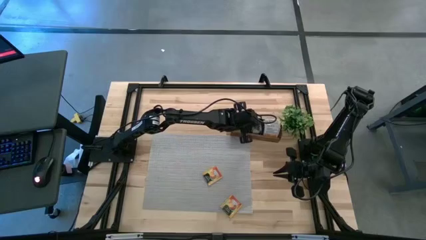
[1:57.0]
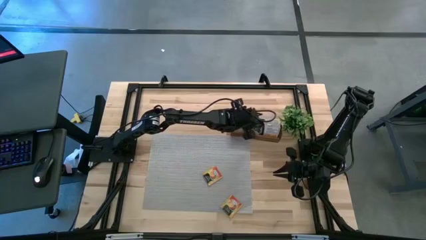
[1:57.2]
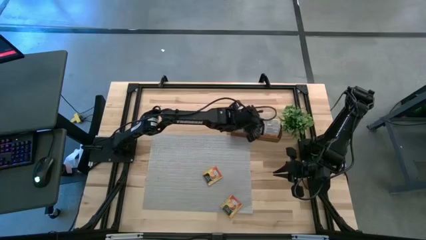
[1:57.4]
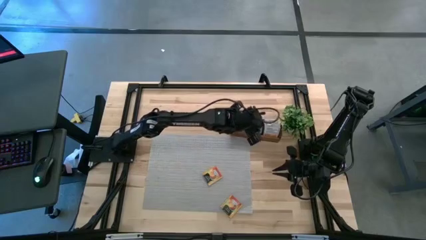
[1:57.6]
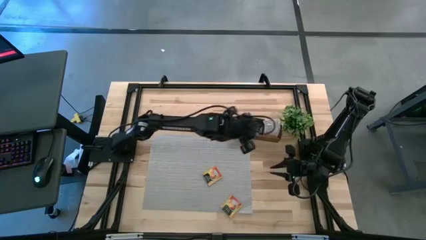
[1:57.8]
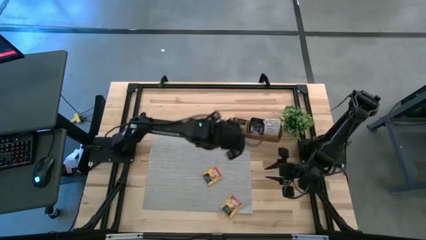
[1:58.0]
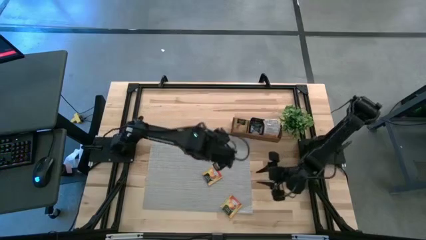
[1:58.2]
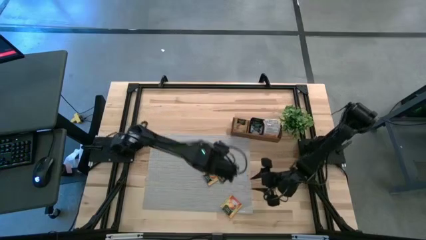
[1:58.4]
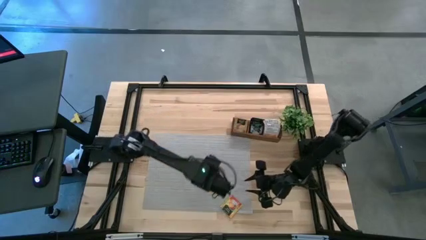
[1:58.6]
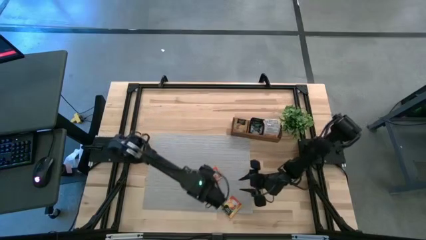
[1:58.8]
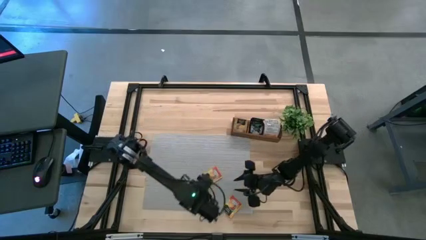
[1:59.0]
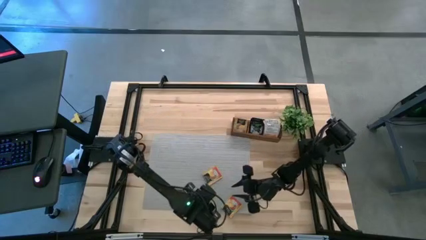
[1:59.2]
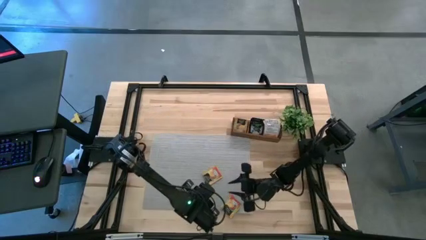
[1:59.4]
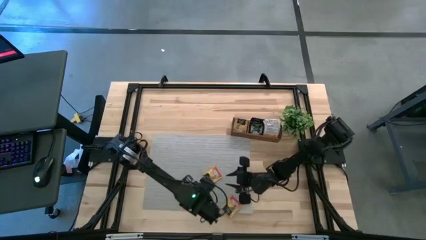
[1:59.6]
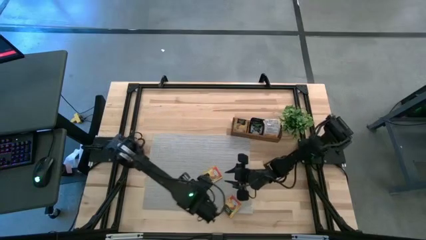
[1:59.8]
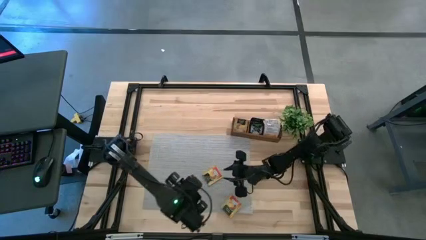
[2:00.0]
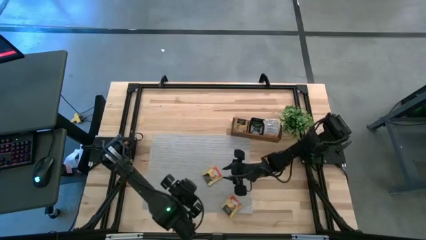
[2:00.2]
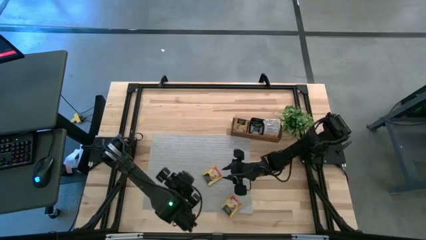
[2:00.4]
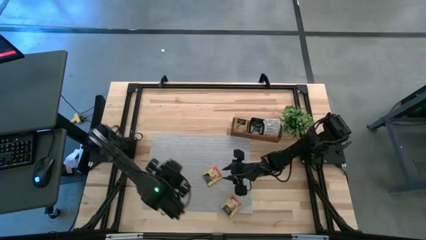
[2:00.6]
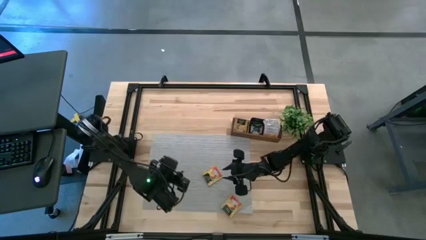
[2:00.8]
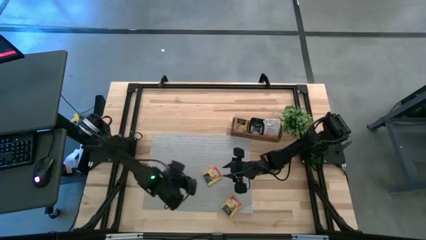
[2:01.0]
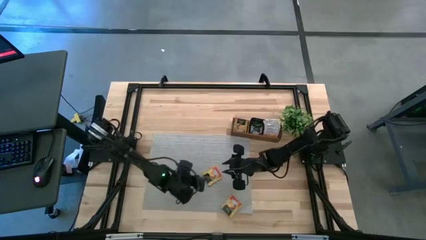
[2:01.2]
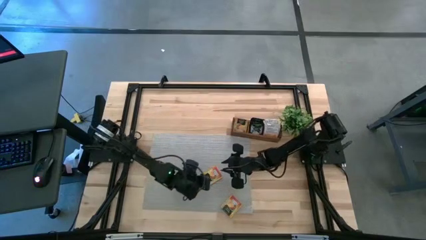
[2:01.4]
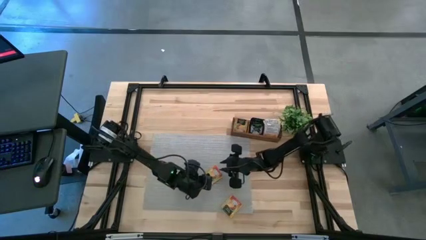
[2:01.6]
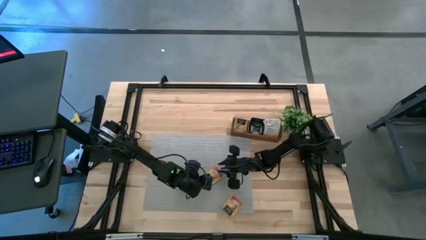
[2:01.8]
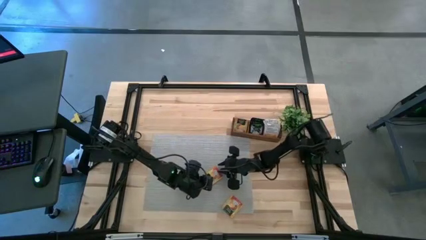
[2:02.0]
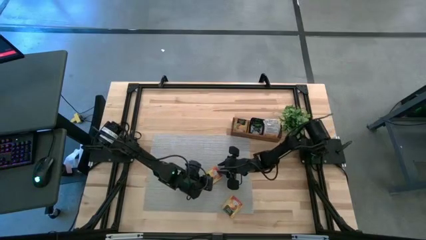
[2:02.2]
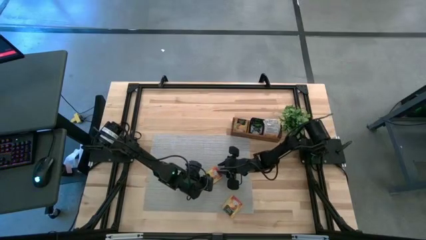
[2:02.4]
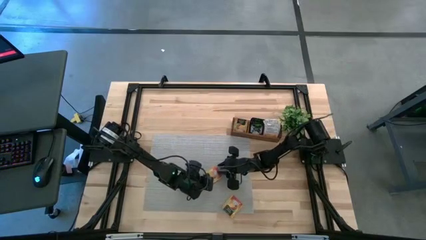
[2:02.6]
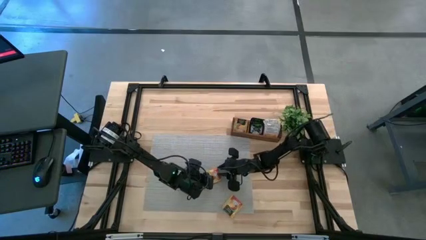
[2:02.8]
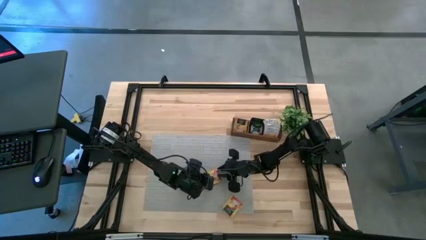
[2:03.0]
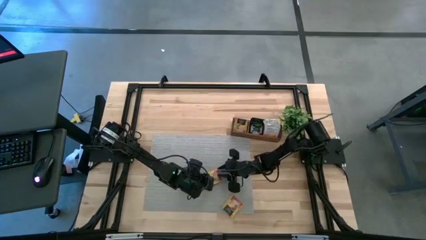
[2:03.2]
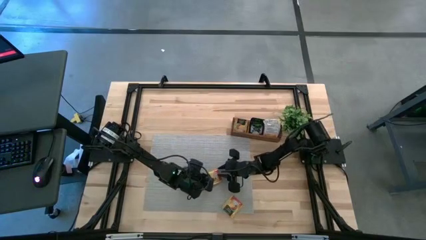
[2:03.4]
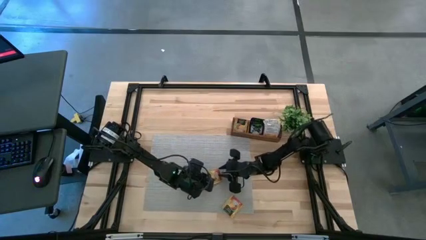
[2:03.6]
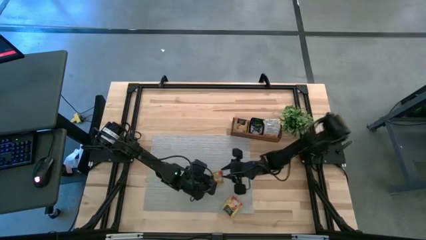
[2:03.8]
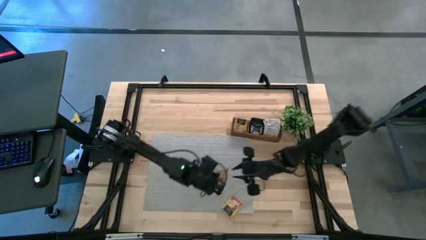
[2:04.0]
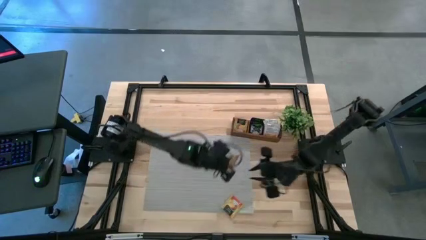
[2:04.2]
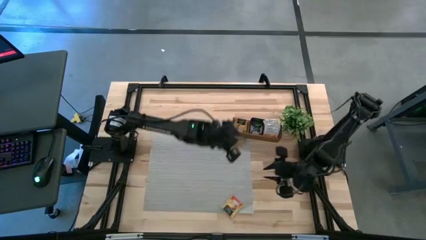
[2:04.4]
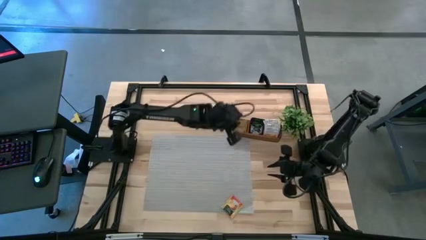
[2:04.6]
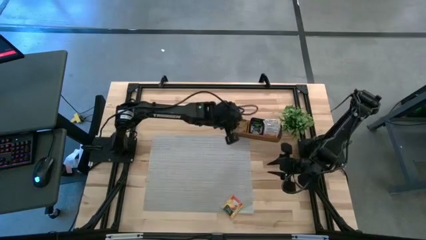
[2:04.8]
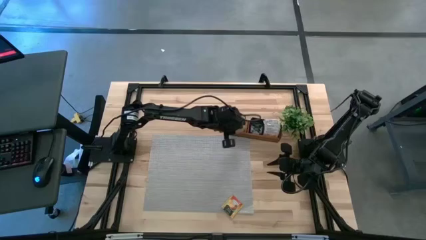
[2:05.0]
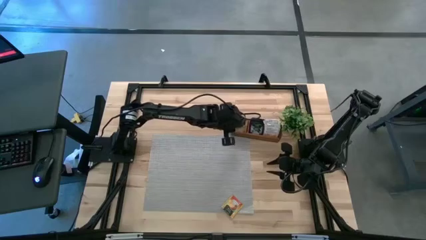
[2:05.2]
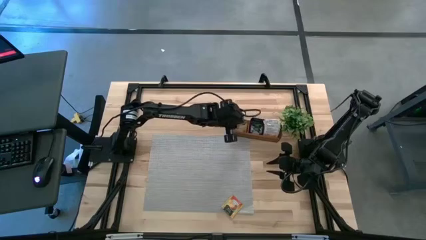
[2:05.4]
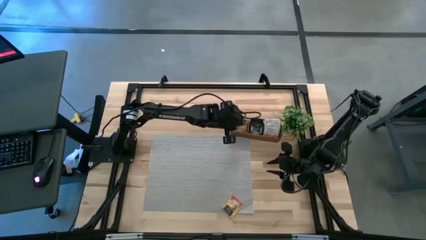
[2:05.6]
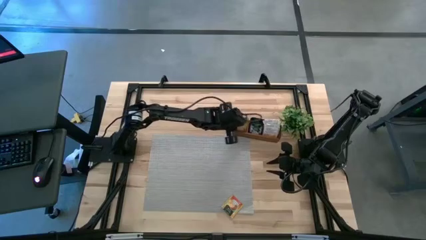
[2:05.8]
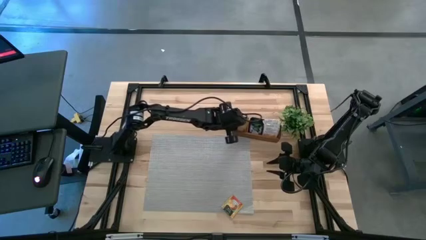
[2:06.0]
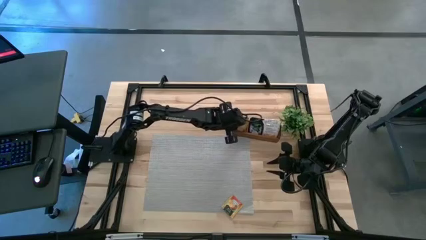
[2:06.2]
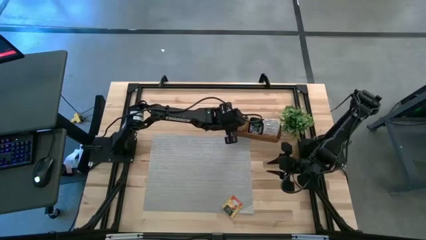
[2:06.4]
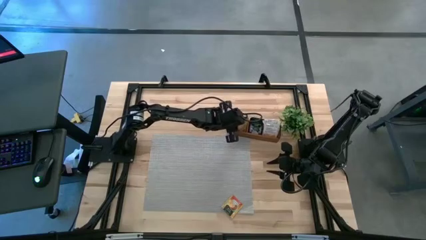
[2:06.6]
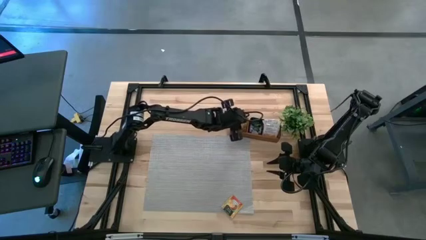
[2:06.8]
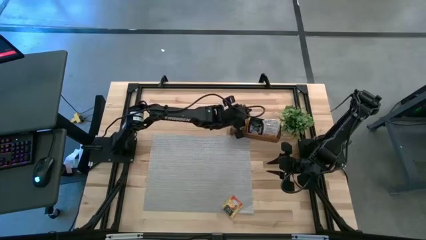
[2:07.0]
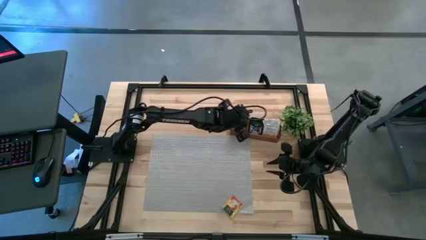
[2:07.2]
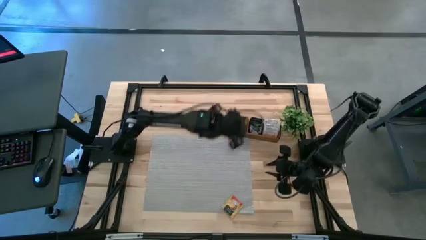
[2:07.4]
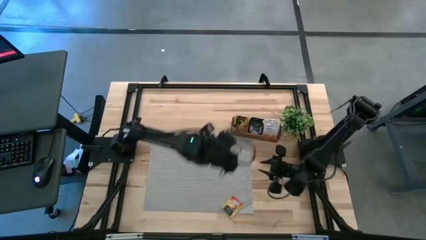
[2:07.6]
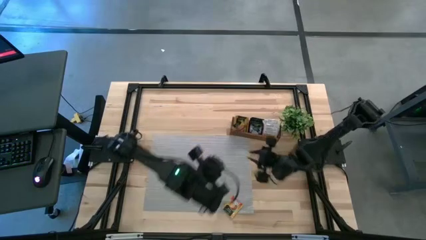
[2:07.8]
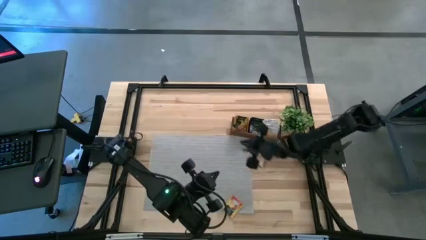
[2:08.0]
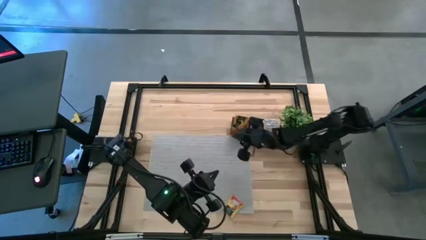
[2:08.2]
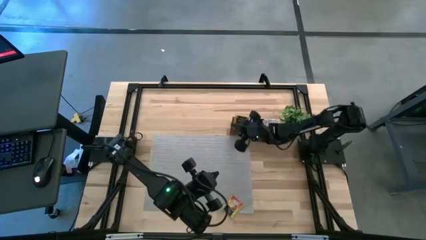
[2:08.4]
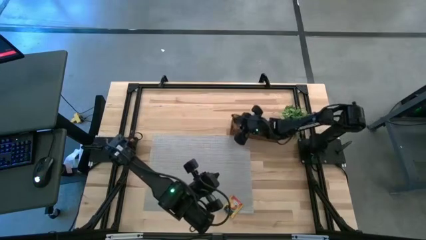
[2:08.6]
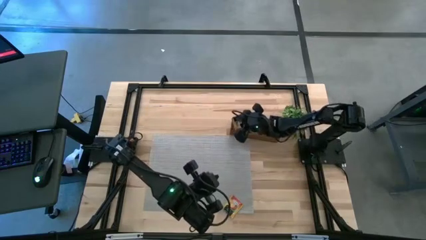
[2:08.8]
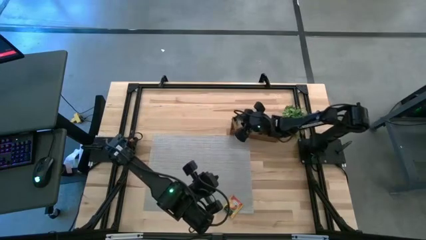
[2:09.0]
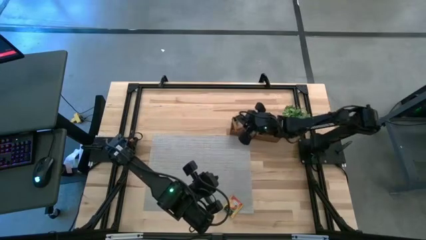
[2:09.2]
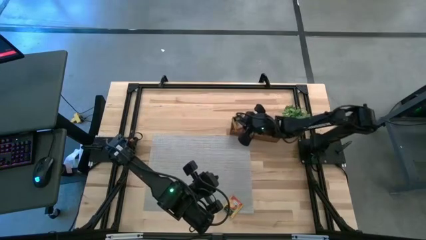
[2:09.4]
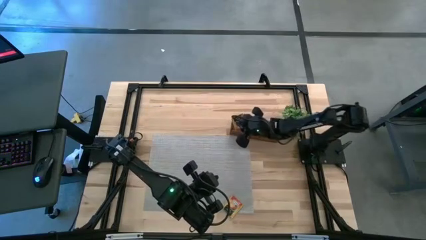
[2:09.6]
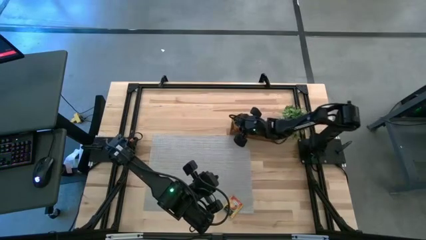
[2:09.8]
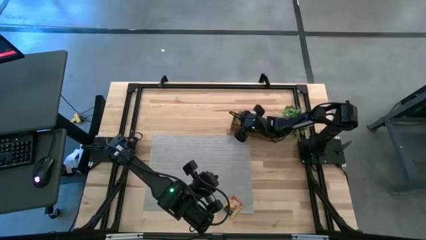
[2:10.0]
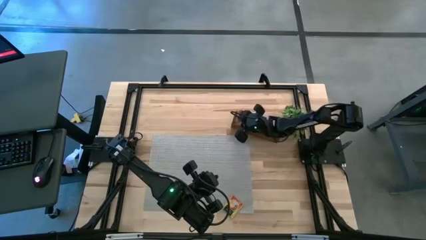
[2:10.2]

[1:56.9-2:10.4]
Task: Pick & Place Tea
Put the yellow tea bag in the left section of the wooden organizer

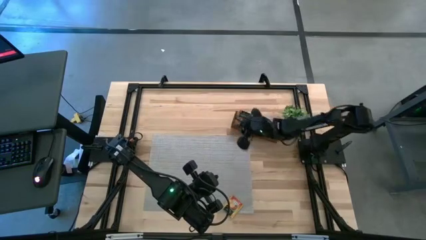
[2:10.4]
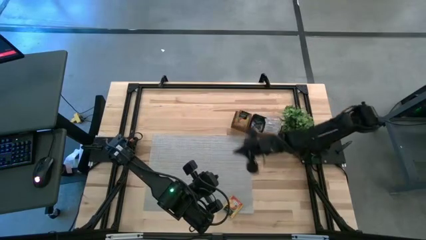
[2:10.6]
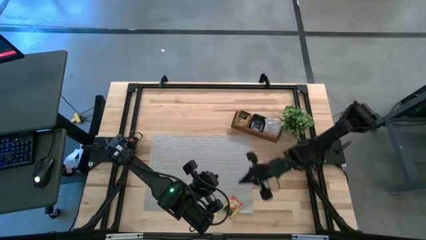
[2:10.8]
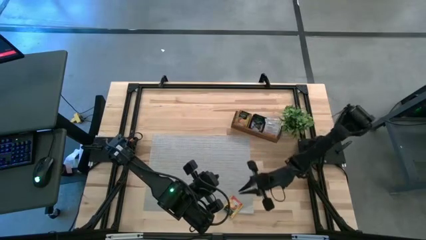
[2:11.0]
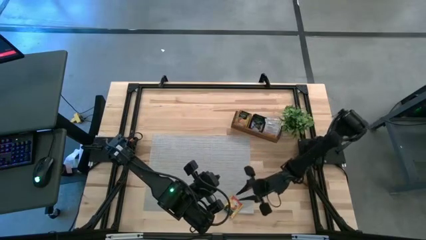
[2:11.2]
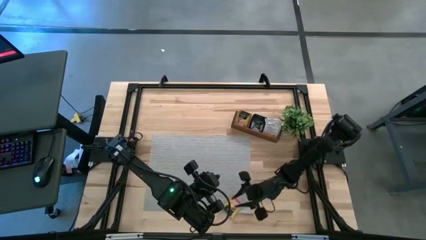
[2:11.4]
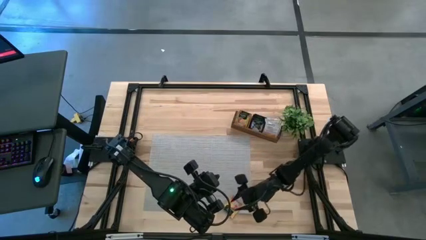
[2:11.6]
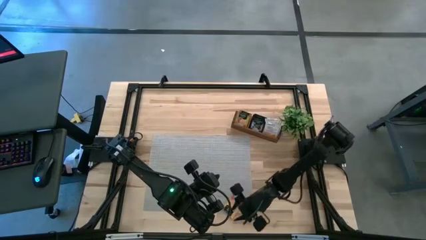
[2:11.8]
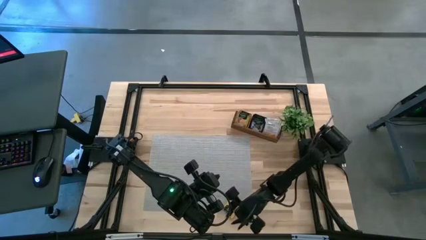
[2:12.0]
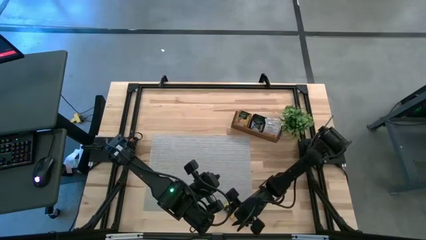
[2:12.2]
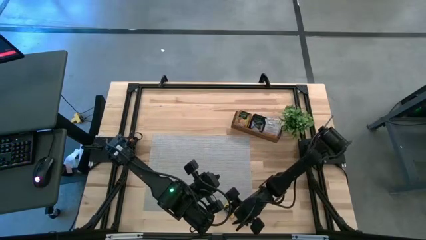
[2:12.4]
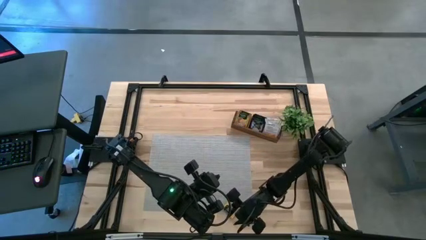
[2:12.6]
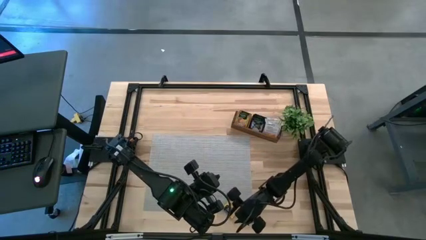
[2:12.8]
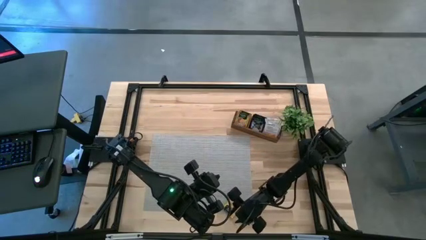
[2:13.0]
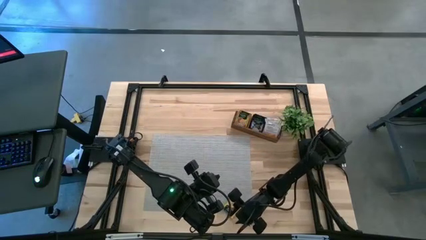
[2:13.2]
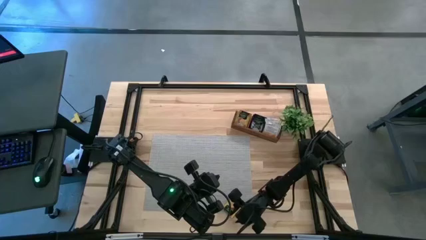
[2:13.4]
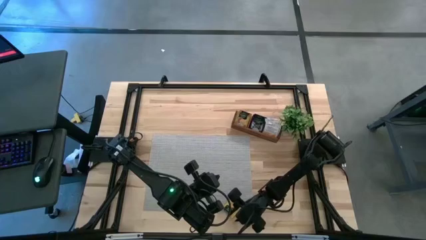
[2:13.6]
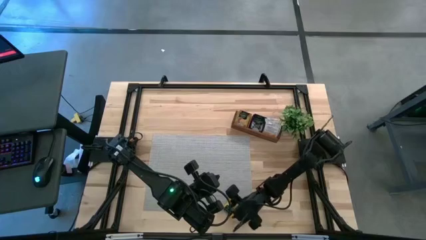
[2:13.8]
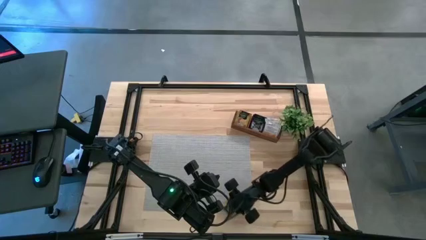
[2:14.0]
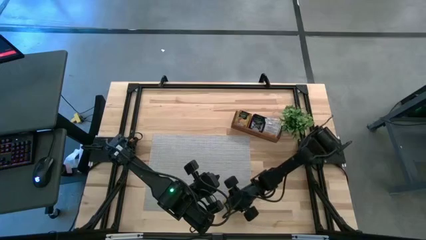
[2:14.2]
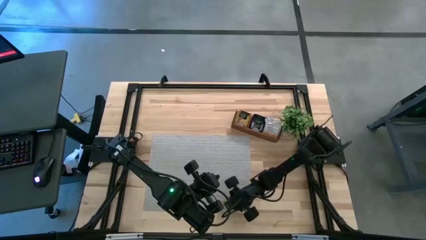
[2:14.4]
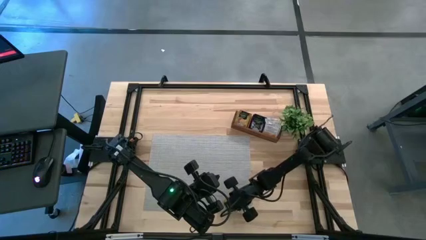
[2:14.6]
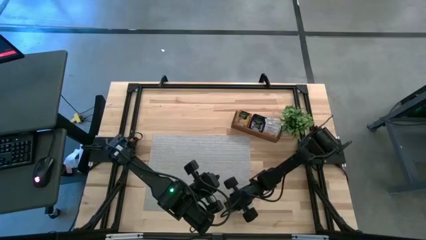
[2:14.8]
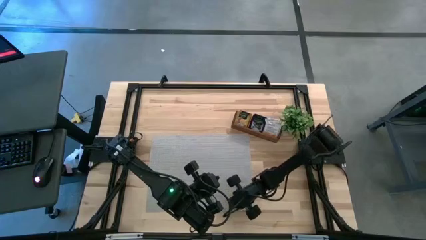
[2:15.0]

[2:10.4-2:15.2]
Put the yellow tea bag in the left section of the wooden organizer
